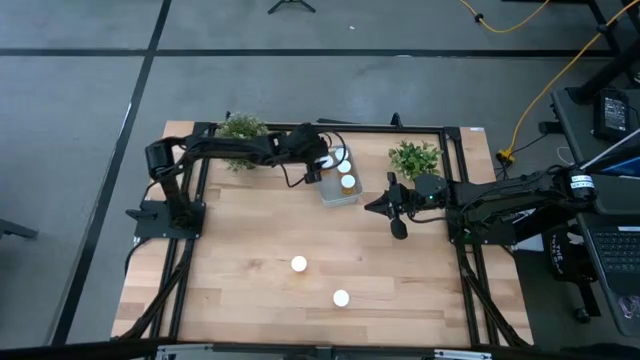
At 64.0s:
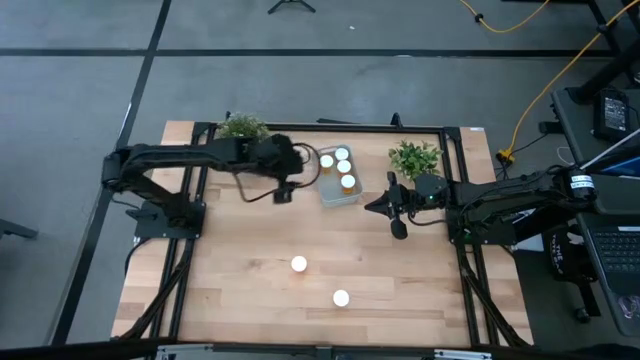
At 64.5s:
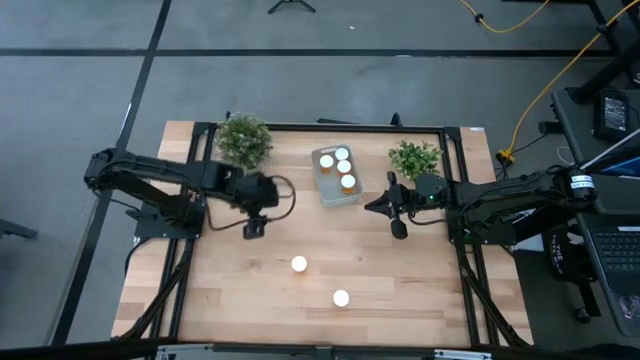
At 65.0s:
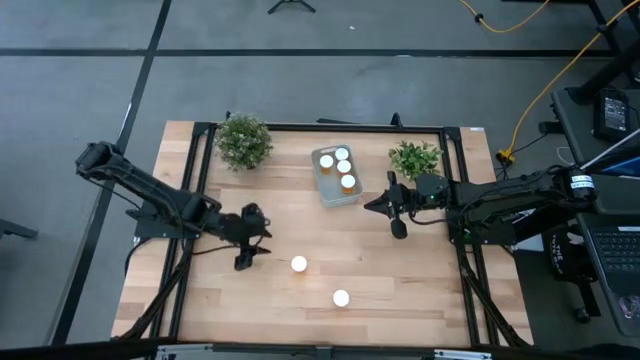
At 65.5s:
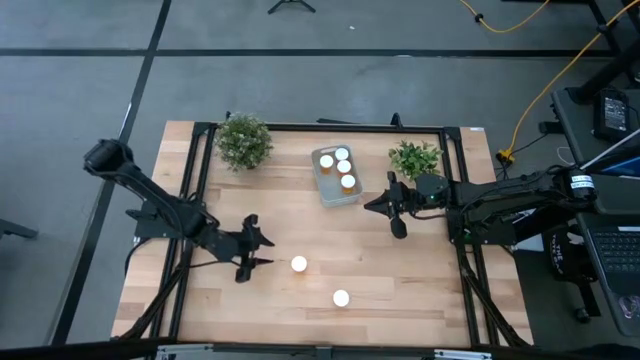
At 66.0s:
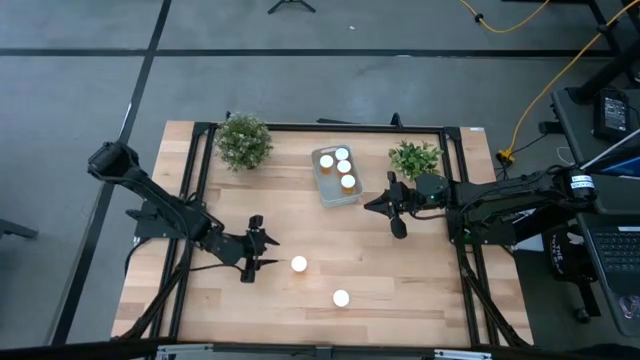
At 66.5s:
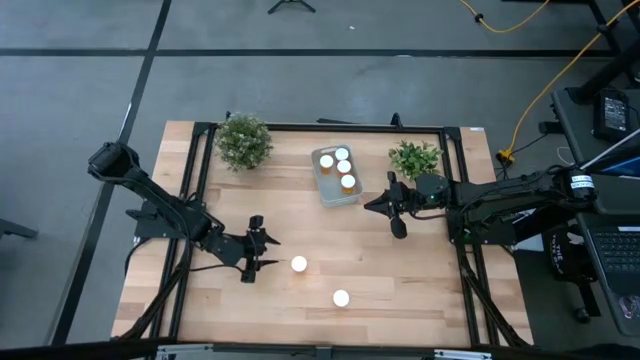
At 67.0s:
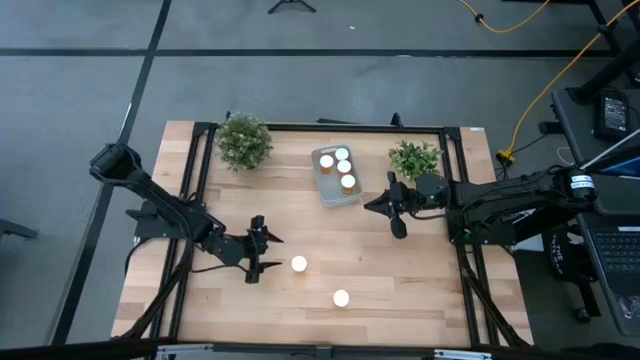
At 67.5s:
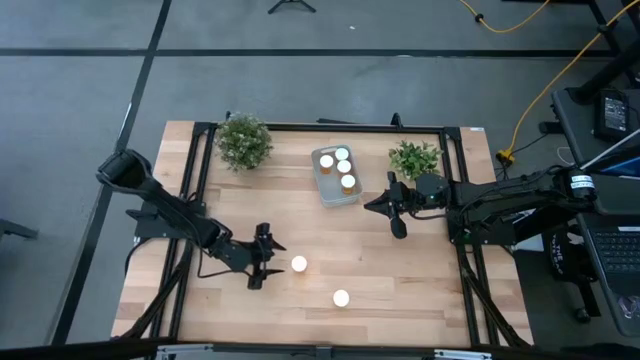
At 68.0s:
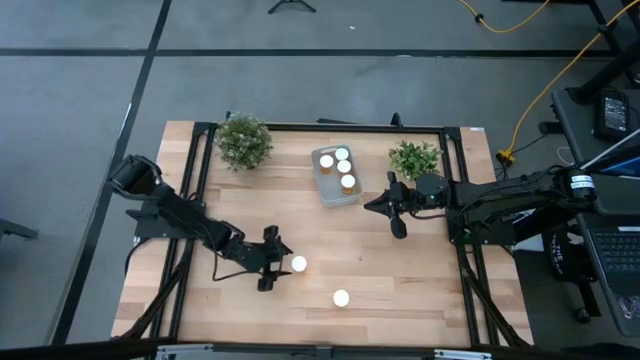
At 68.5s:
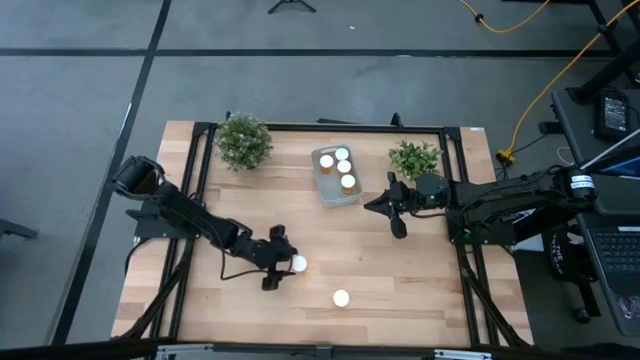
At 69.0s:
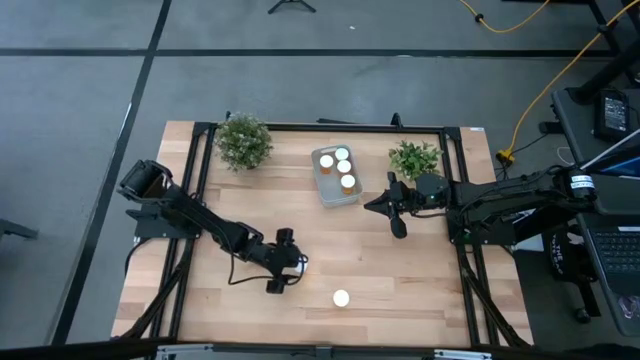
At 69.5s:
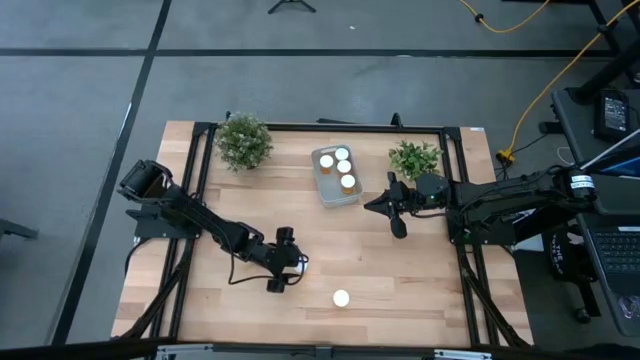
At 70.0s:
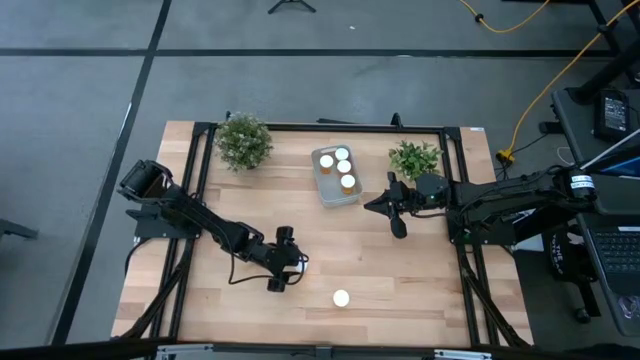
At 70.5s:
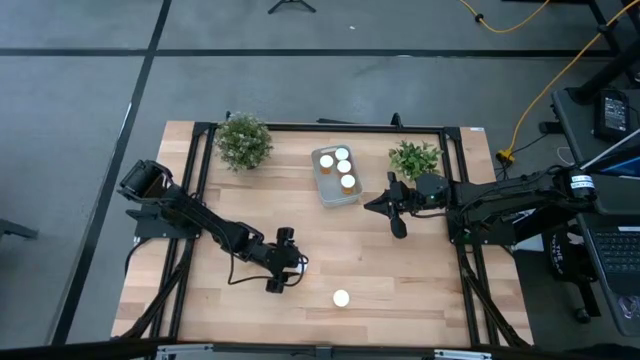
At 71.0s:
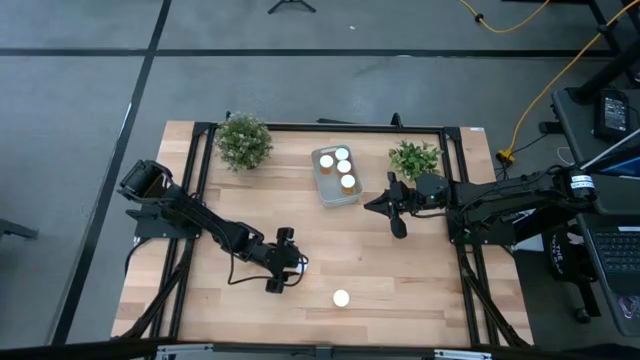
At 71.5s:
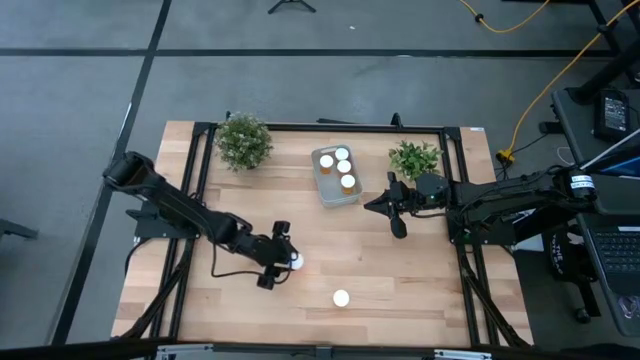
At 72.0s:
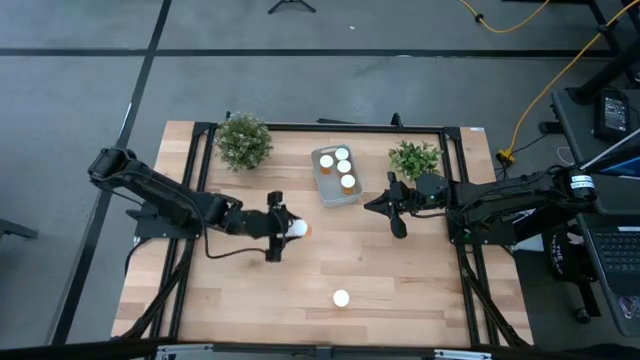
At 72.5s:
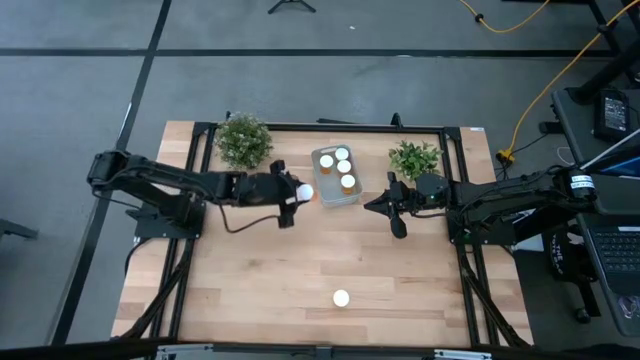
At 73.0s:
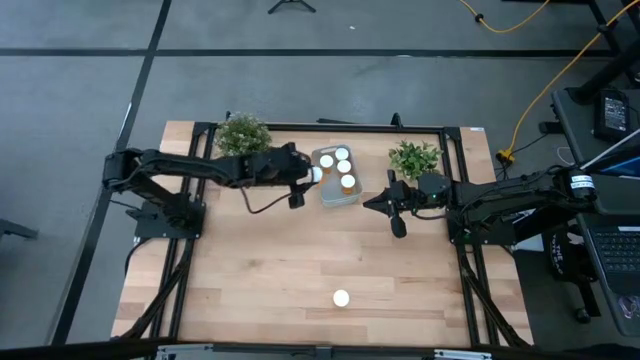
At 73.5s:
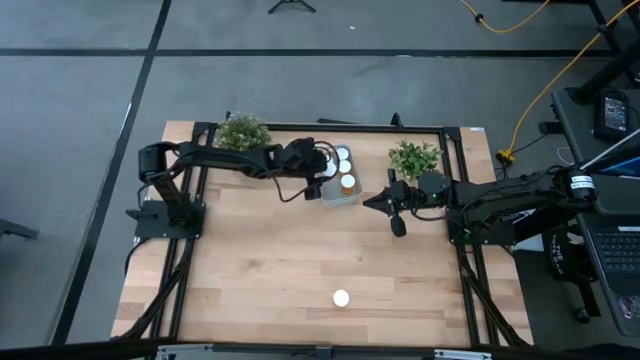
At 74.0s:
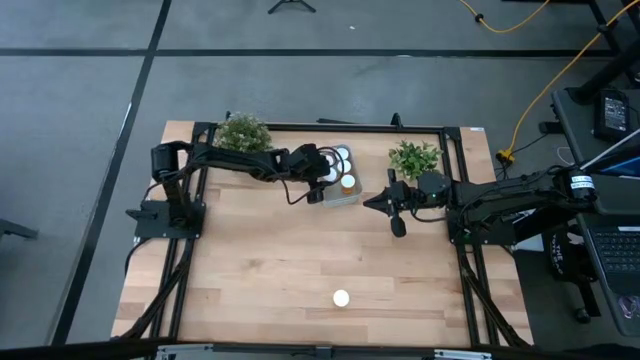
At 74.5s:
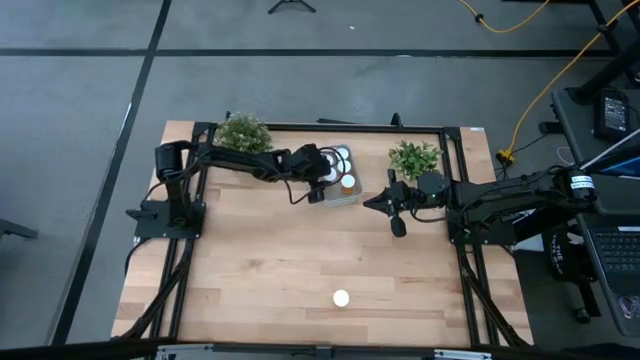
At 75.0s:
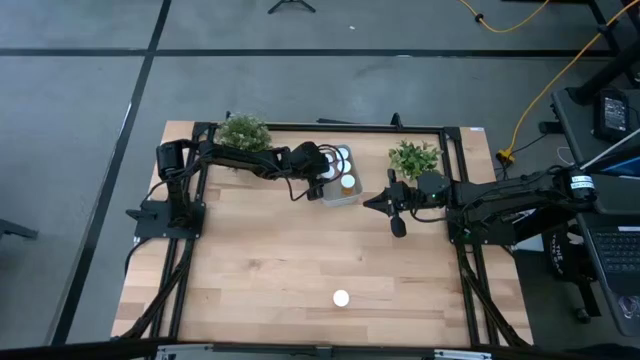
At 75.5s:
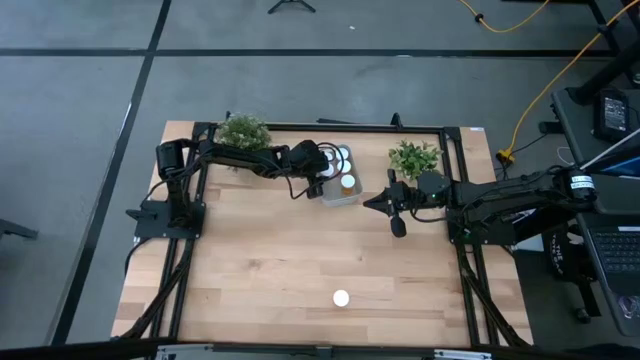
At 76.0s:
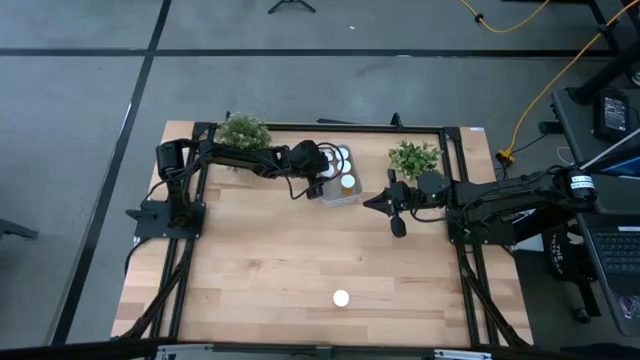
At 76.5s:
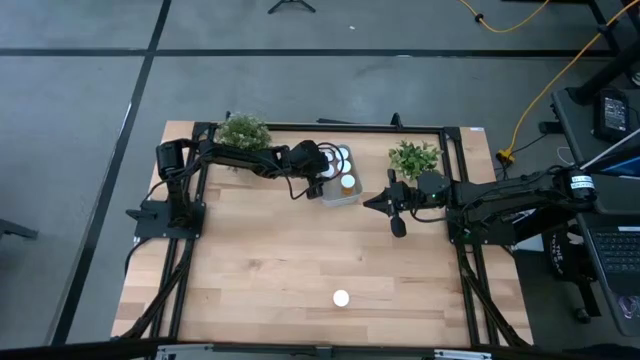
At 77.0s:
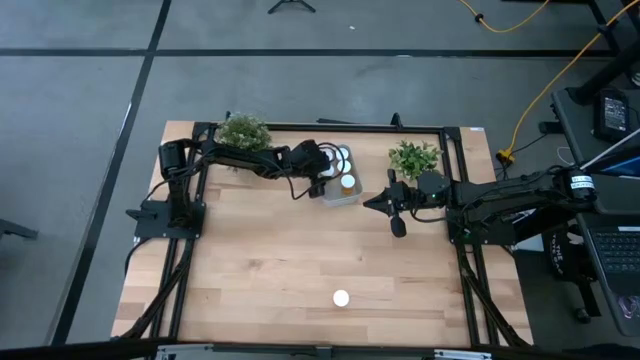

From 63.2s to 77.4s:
Task: Pick and place pill bottles into a basket
Put the orange pill bottle into the gray bin

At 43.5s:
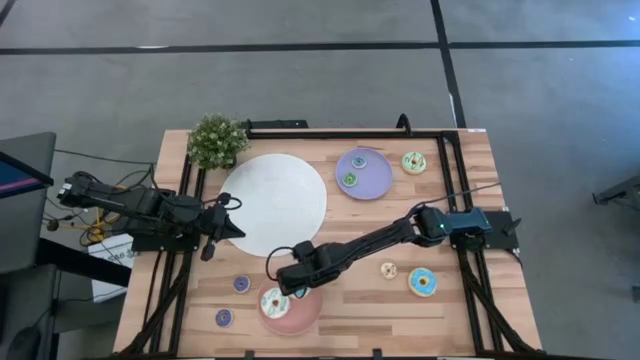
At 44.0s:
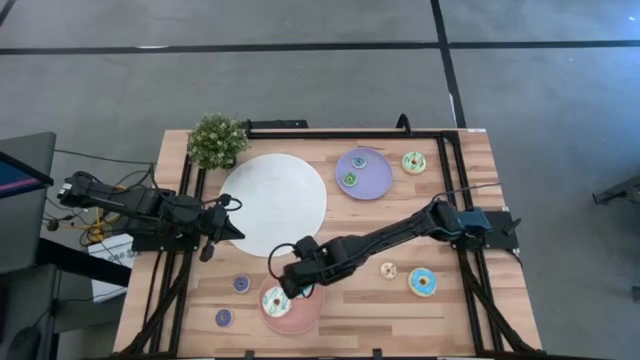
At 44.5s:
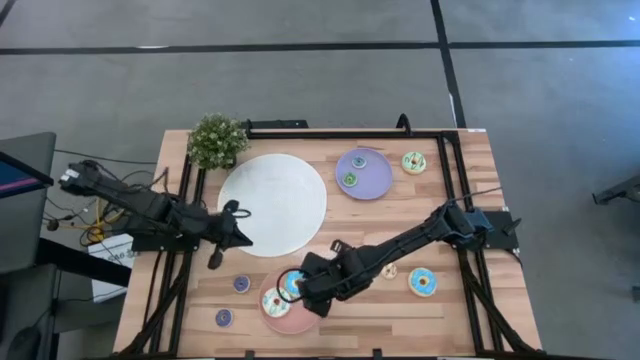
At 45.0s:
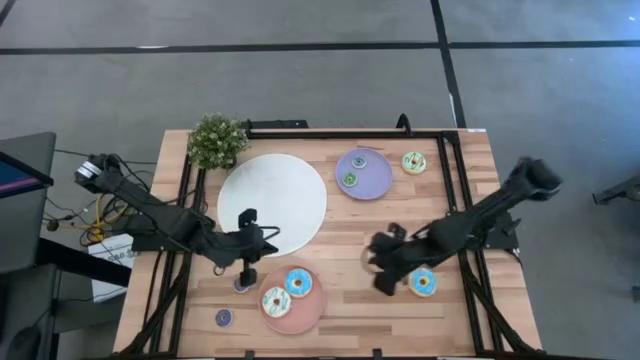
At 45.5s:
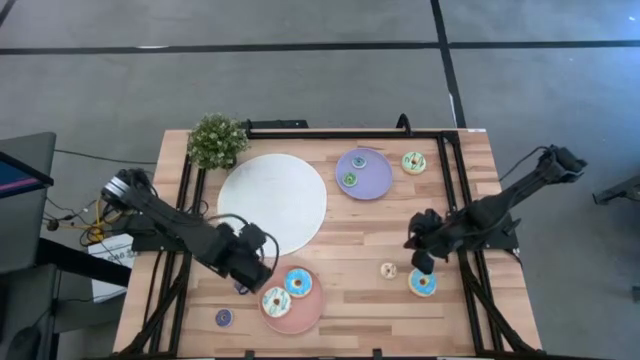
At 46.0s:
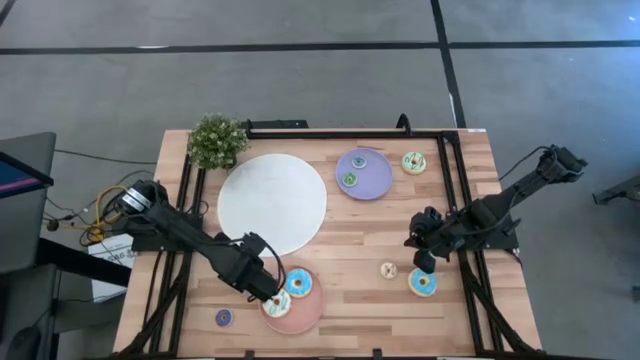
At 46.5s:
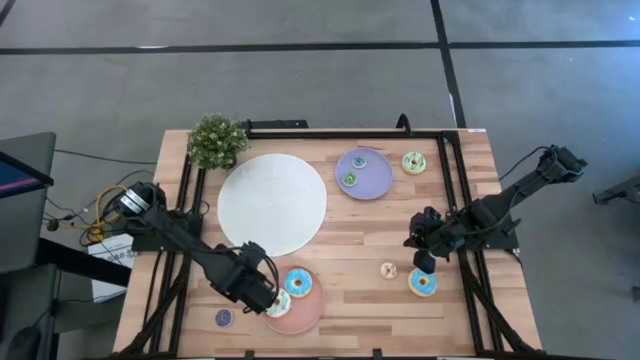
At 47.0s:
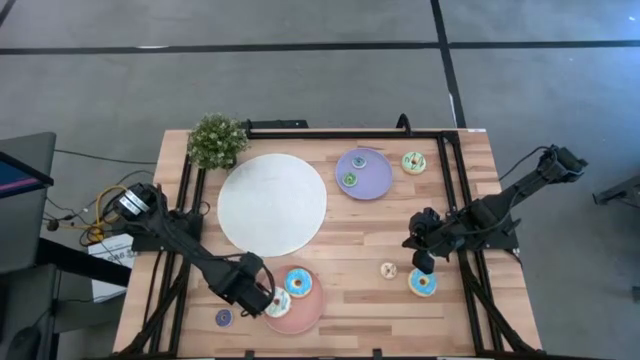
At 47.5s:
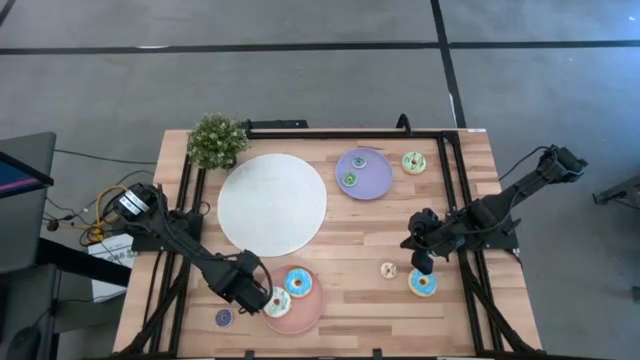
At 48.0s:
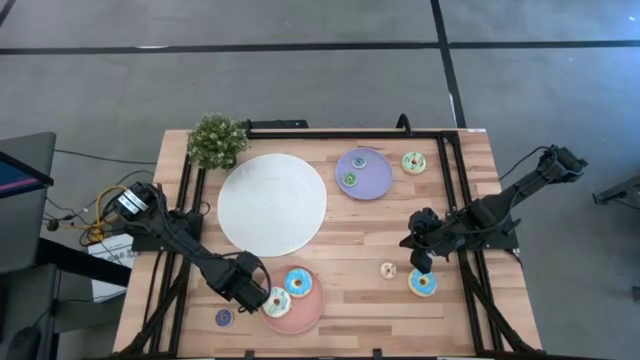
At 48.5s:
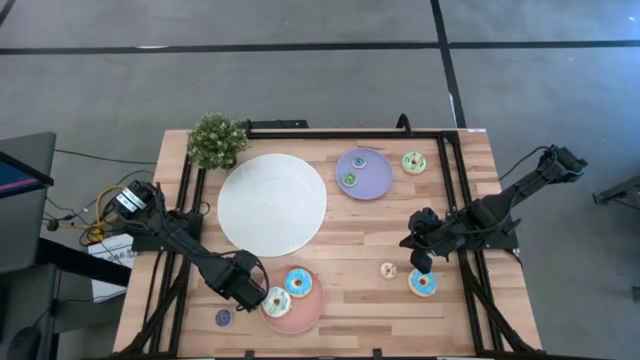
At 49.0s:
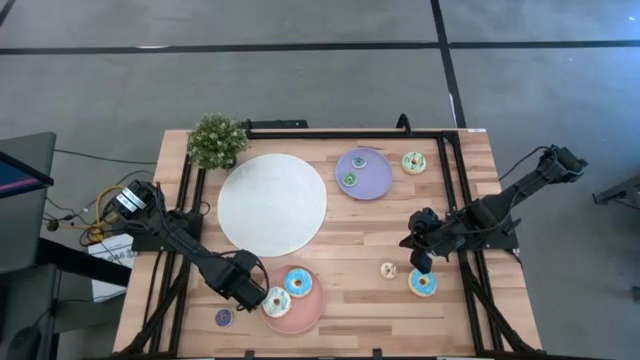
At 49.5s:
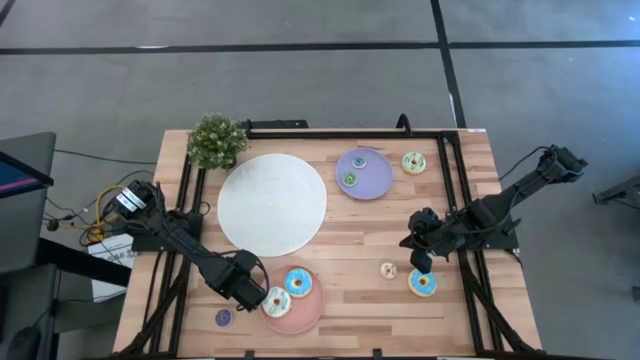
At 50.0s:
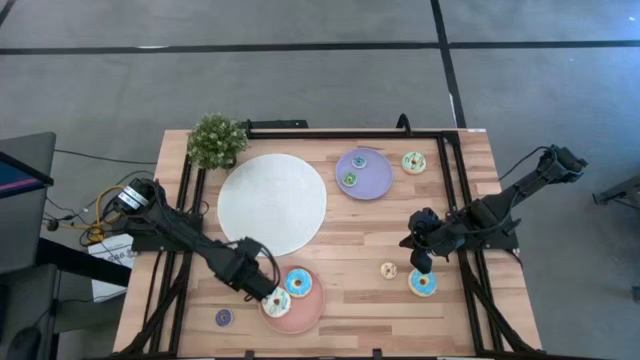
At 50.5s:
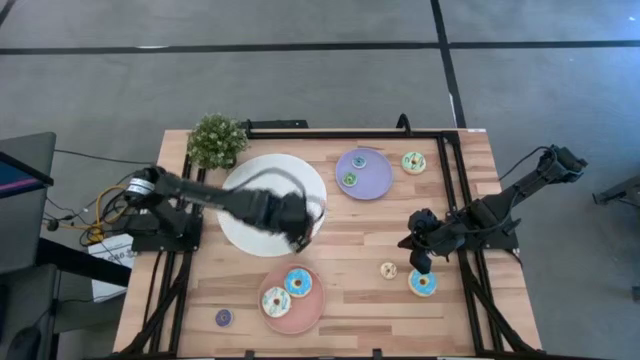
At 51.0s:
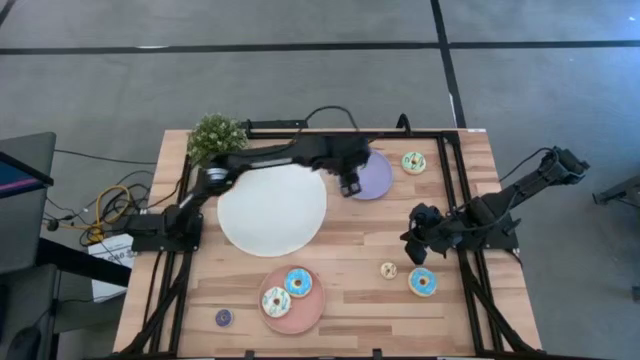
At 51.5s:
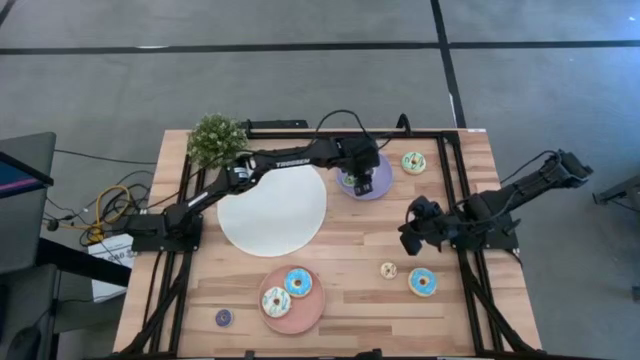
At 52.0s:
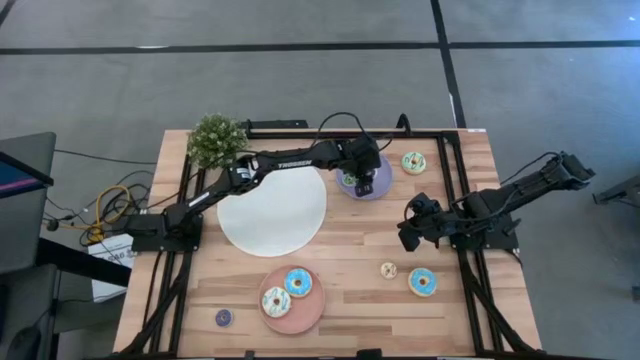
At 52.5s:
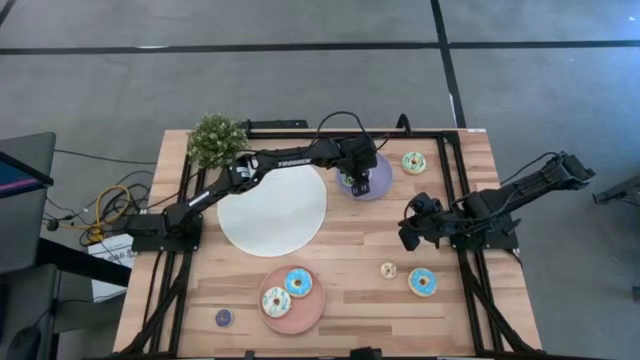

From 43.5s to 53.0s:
Task: Pick & Place donuts
Put the small dark blue donut on the purple plate
